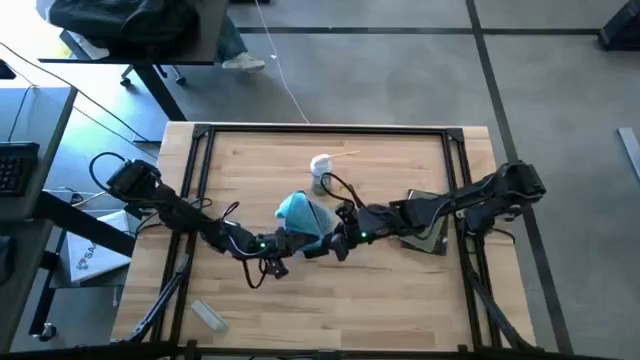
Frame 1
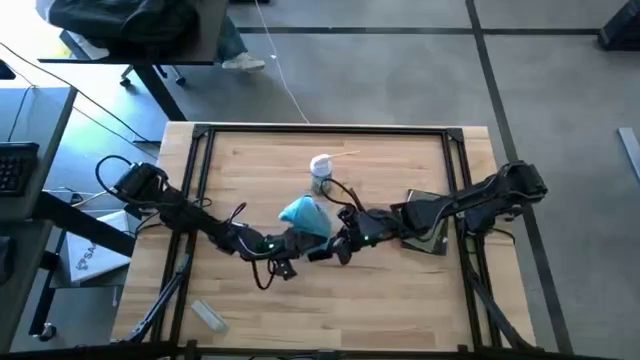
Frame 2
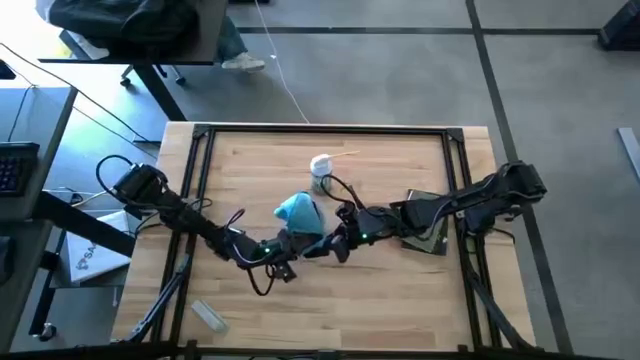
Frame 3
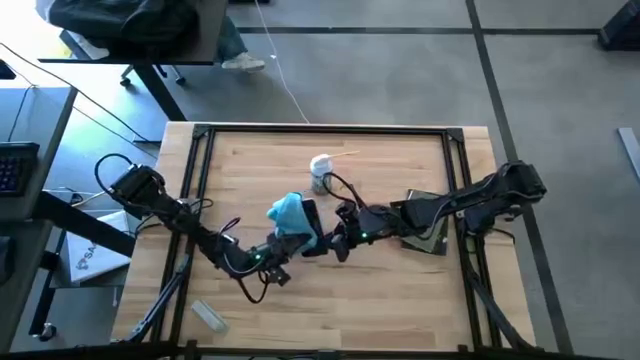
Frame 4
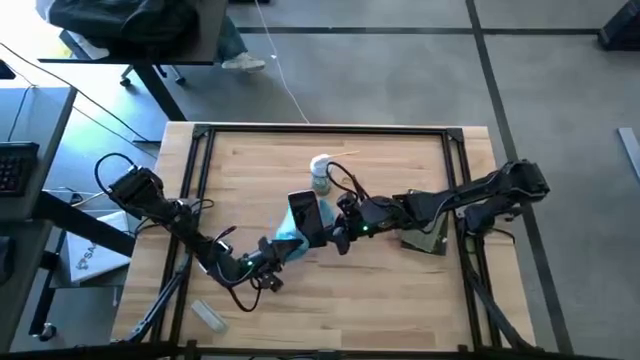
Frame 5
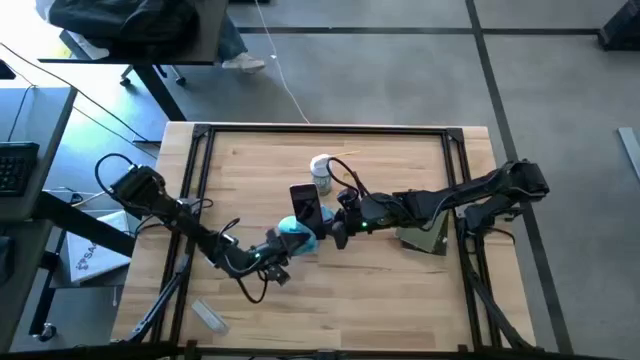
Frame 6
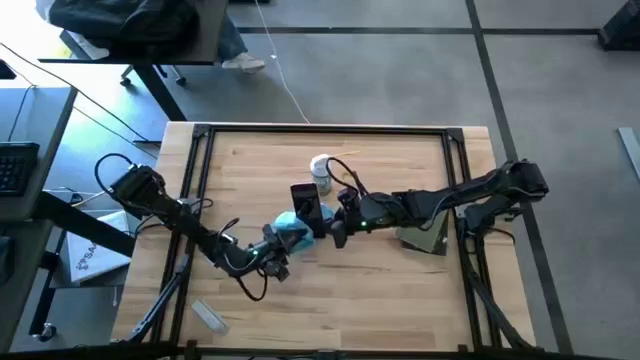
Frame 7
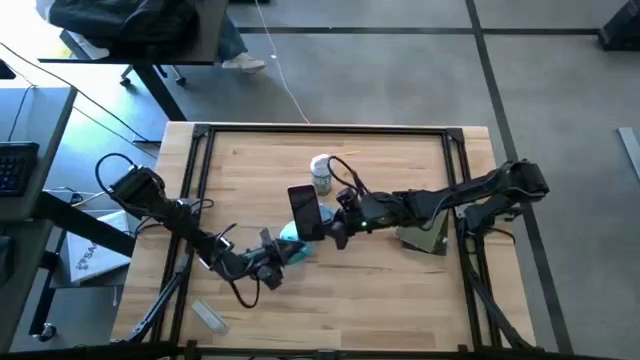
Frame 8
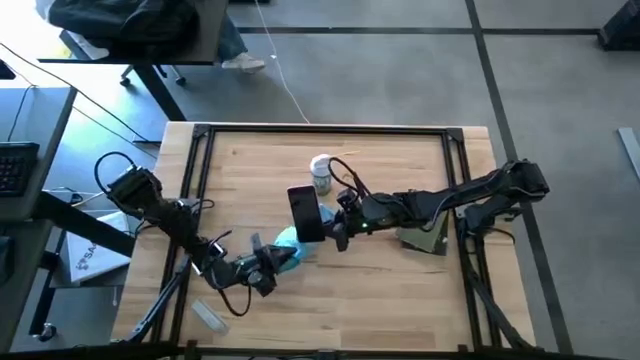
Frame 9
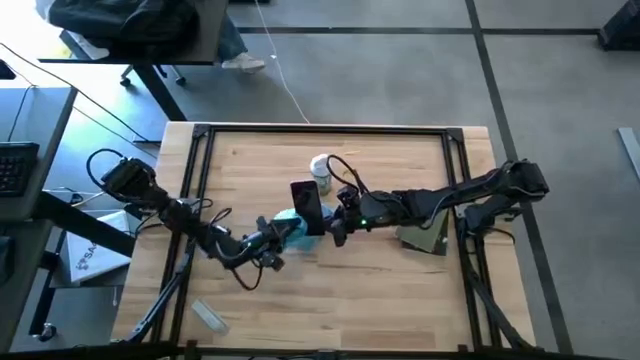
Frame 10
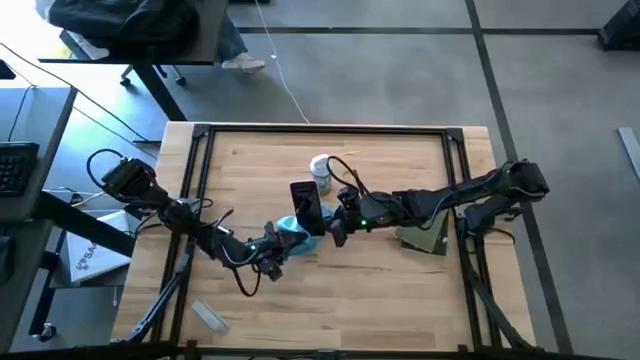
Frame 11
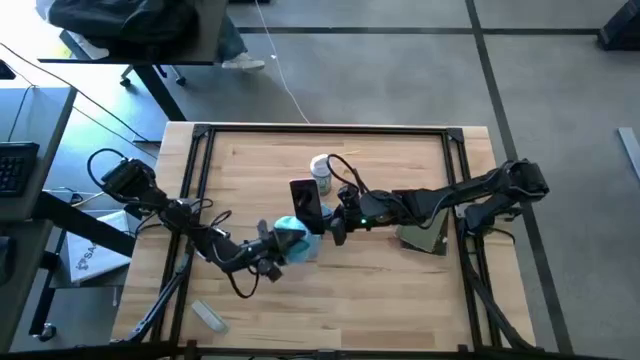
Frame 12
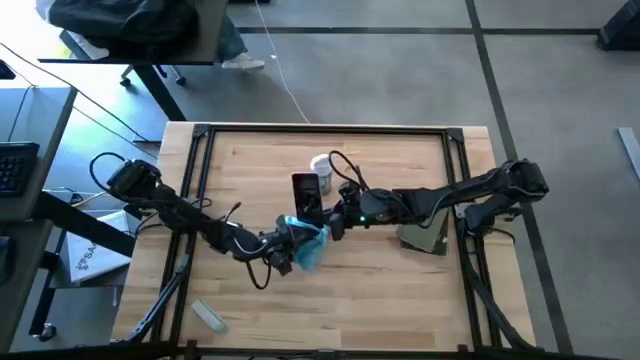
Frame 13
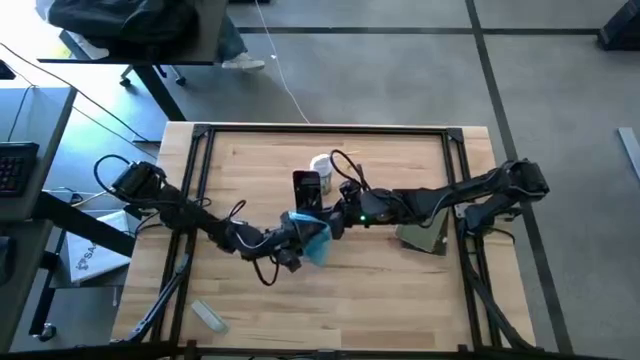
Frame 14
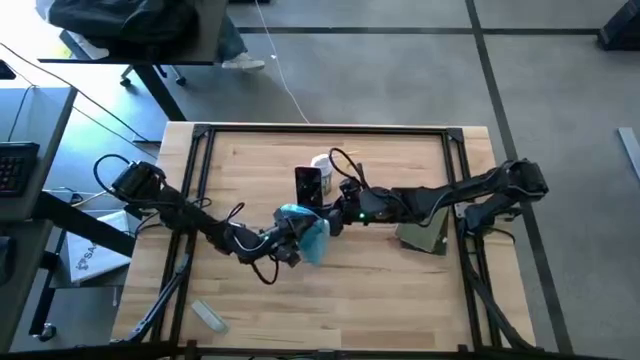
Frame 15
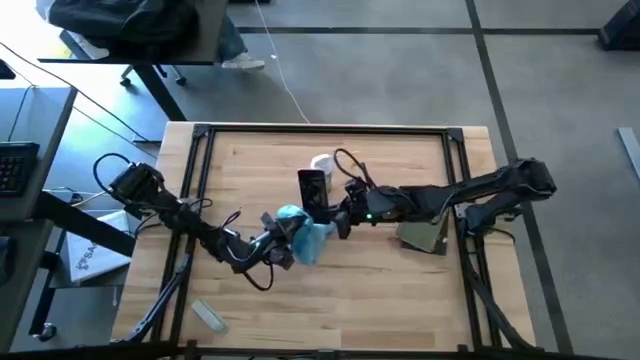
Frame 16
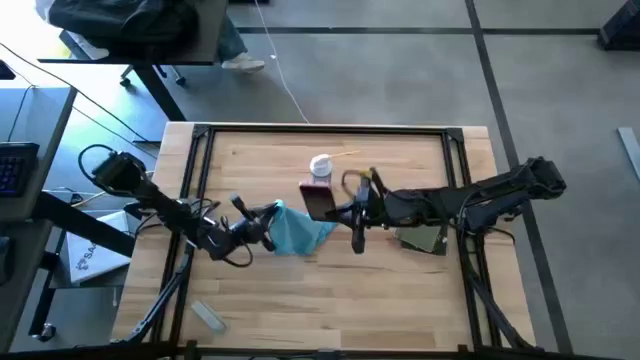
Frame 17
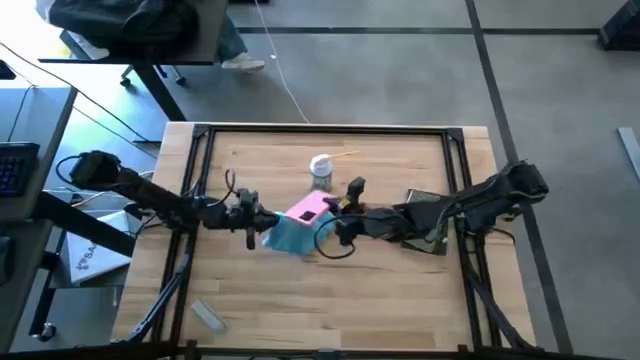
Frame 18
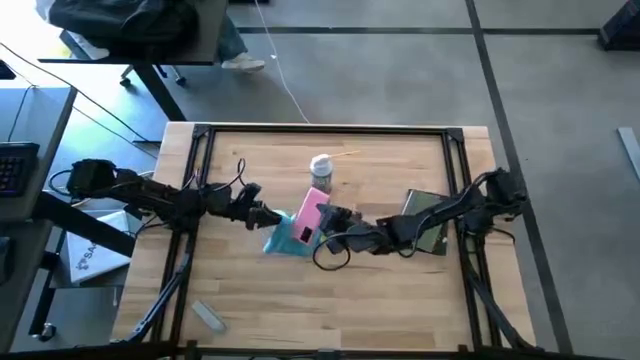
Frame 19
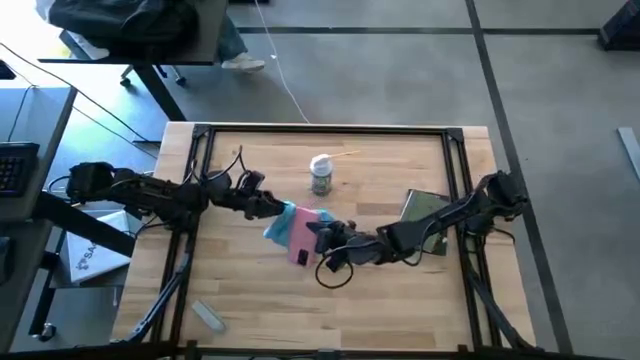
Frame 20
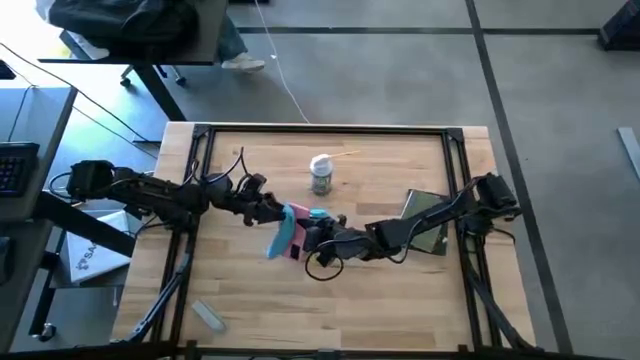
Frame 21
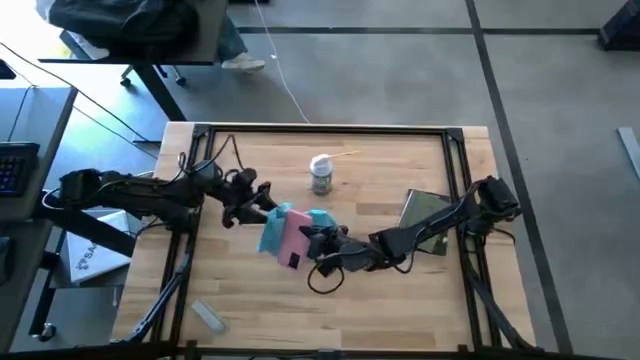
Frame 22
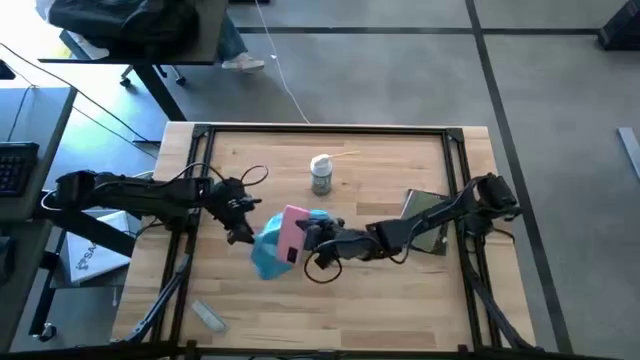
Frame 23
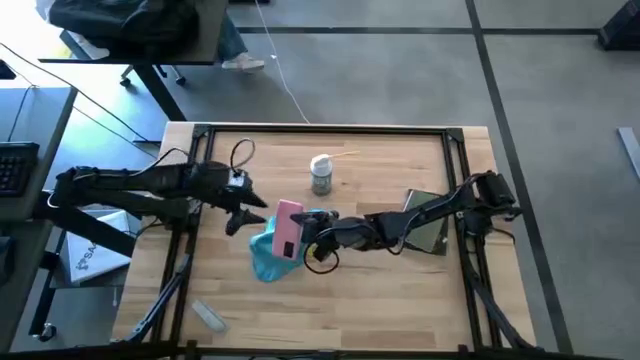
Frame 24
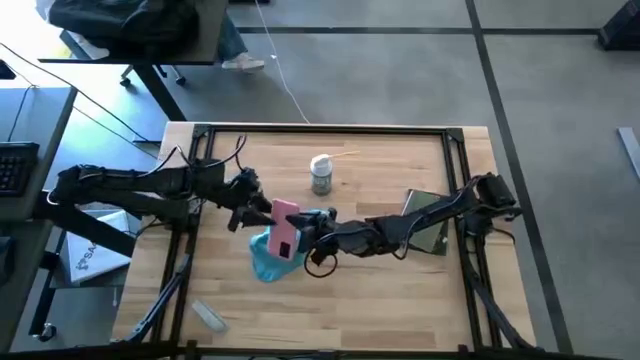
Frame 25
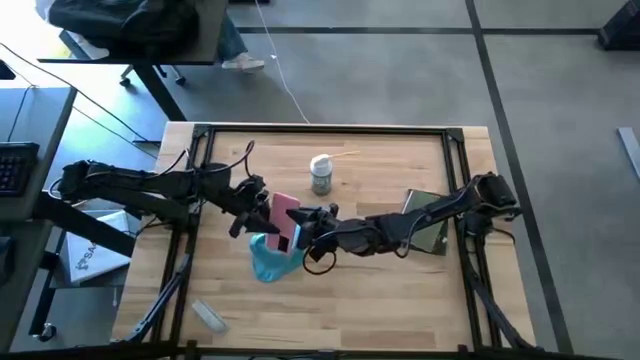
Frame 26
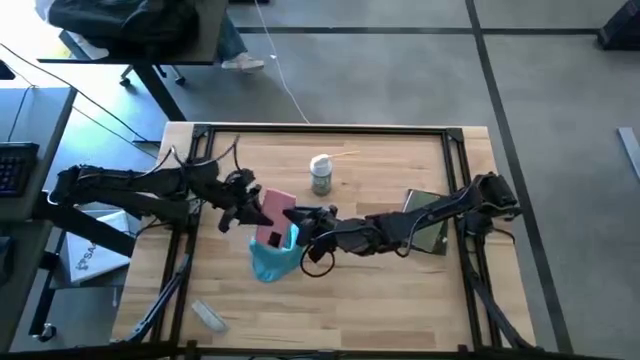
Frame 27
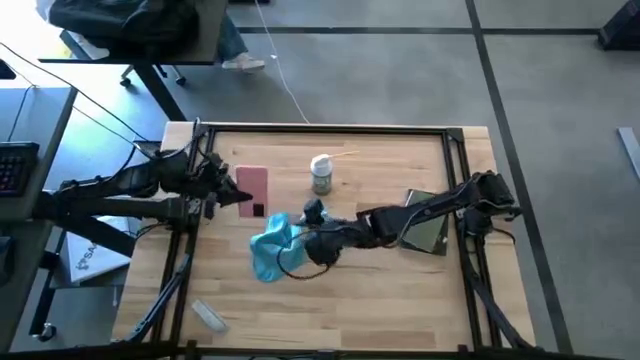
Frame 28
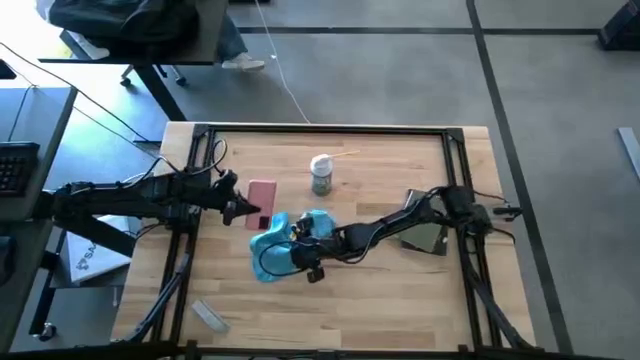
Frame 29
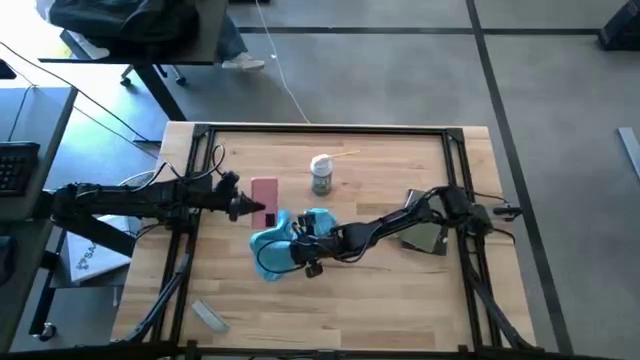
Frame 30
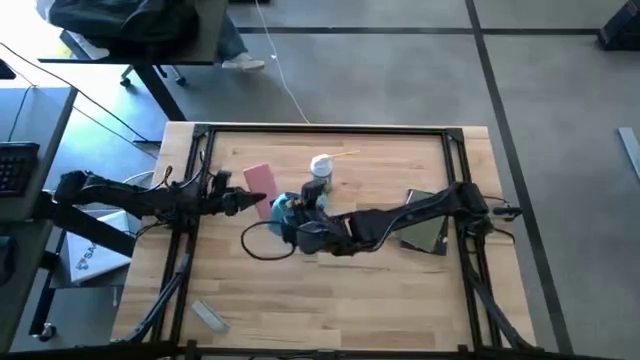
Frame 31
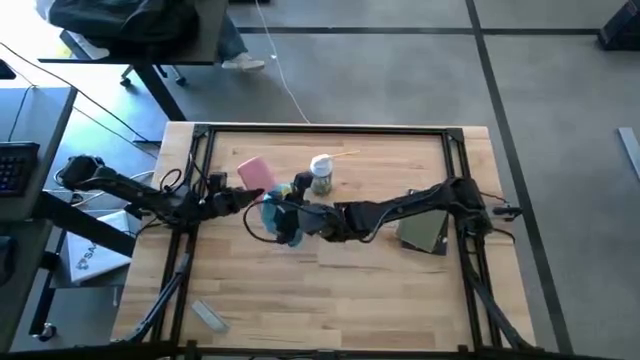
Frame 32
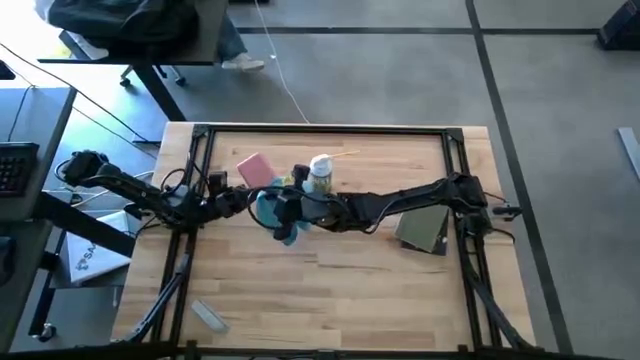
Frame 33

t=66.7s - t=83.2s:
Task: Apply microfiber cloth
Wipe the front and back of the pink cellphone with a blue microfiber cloth
